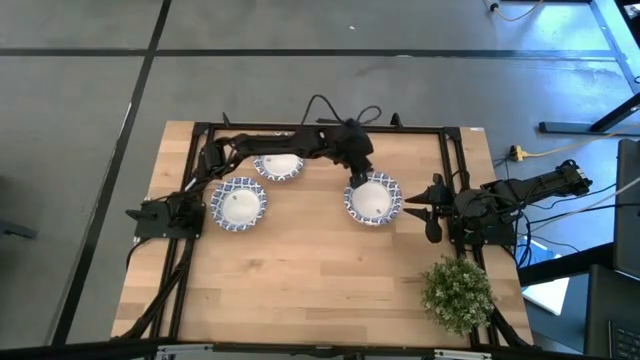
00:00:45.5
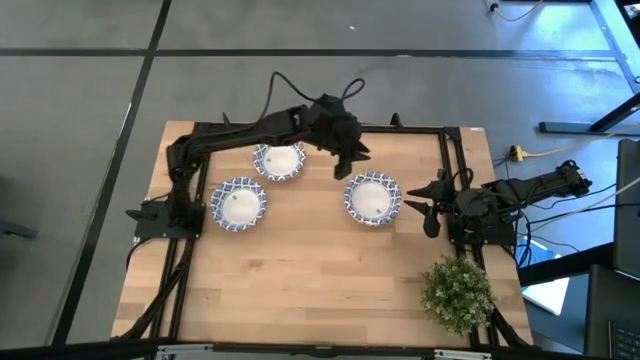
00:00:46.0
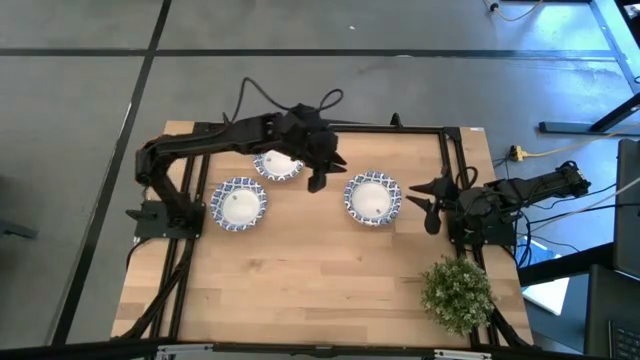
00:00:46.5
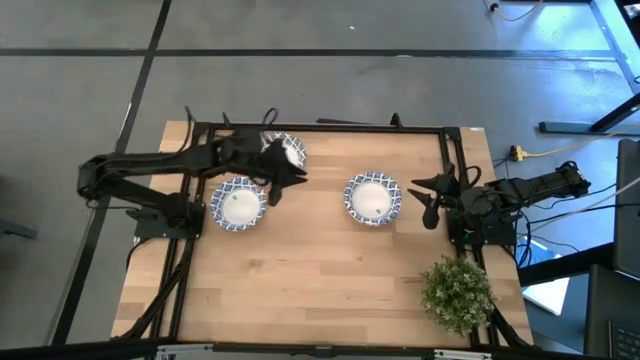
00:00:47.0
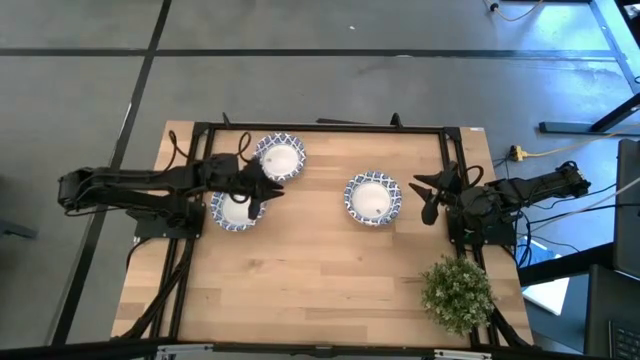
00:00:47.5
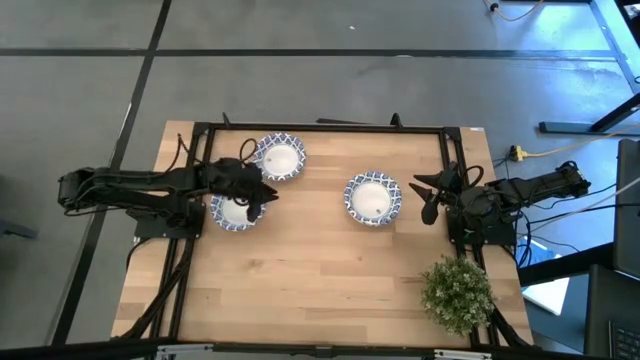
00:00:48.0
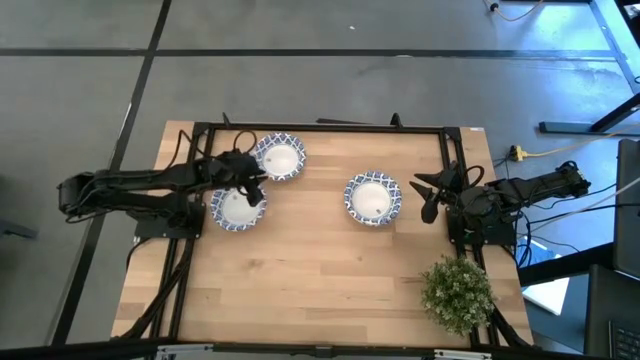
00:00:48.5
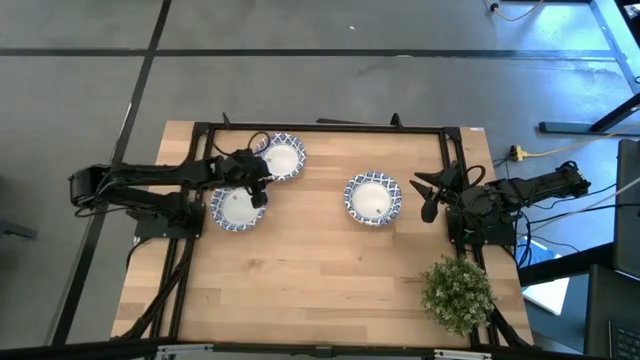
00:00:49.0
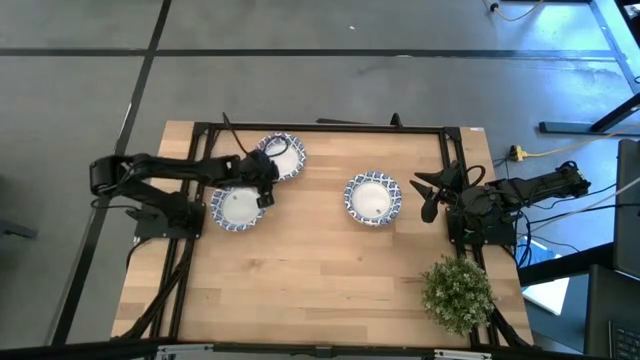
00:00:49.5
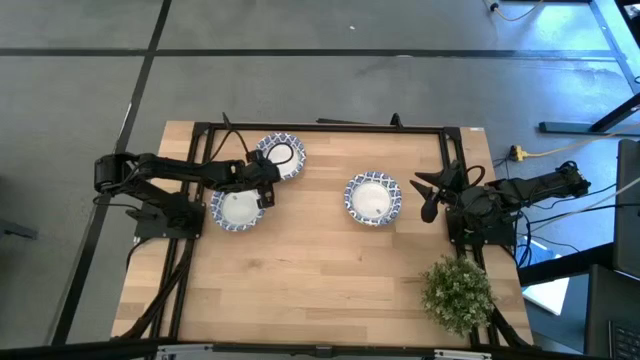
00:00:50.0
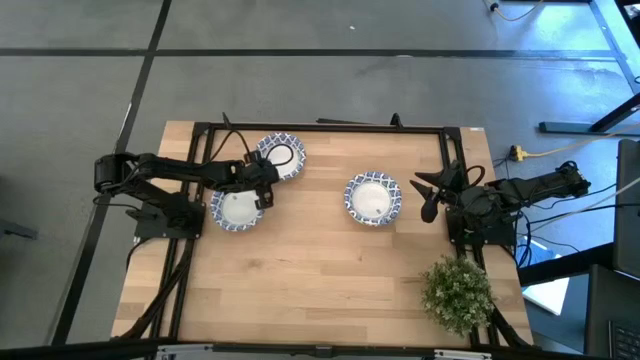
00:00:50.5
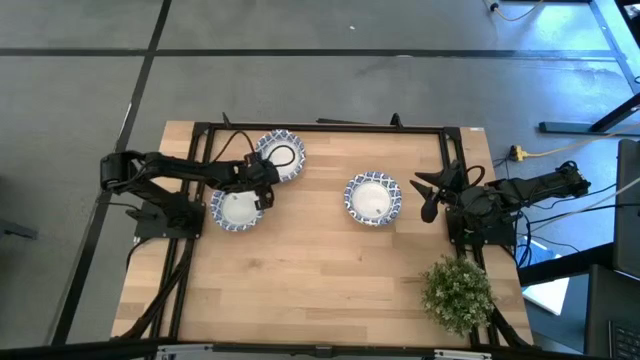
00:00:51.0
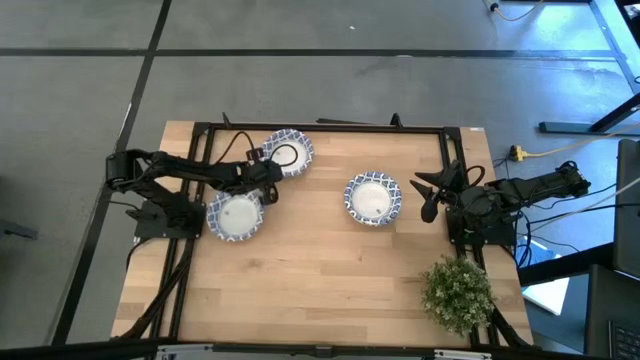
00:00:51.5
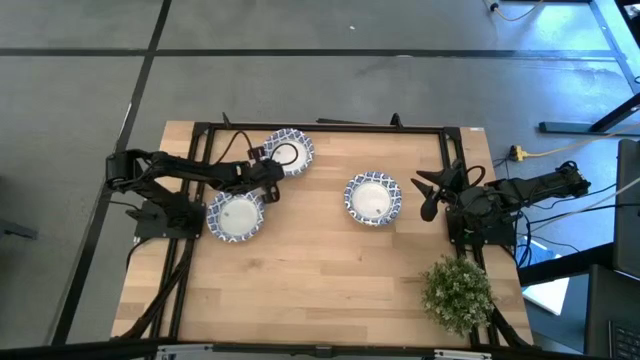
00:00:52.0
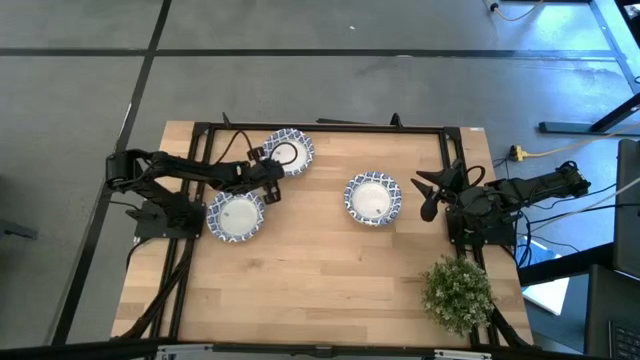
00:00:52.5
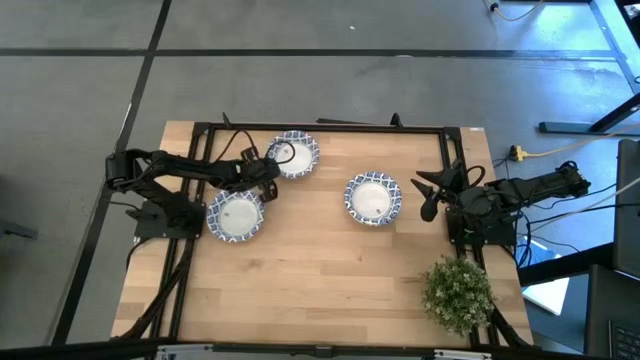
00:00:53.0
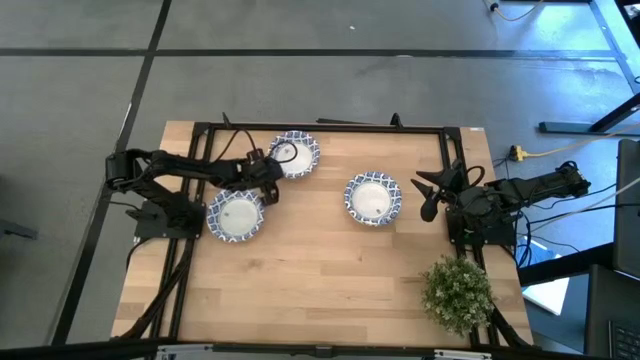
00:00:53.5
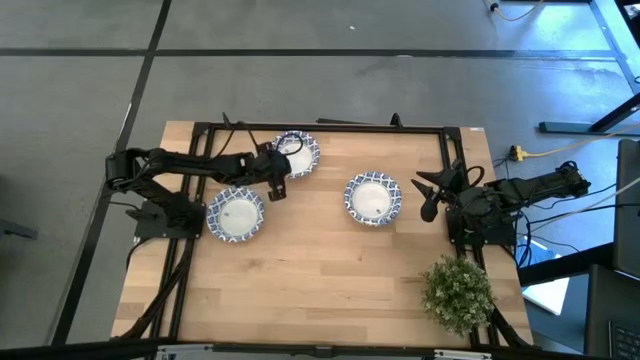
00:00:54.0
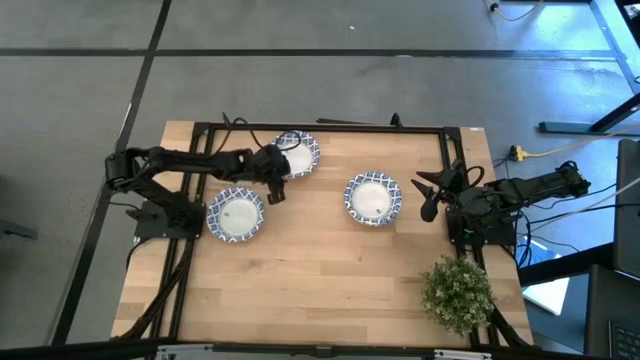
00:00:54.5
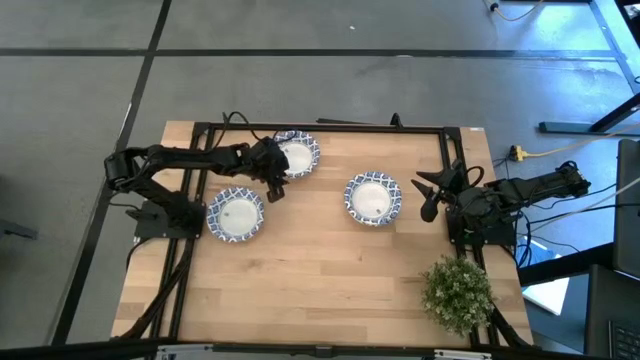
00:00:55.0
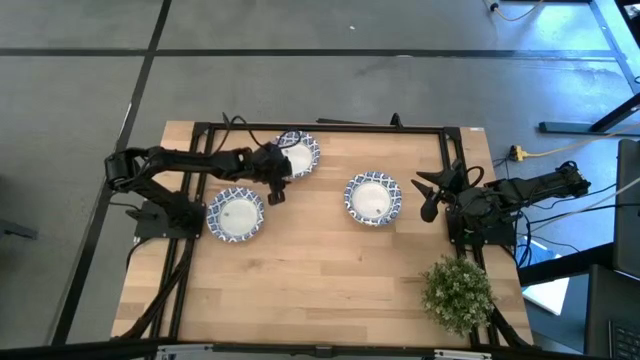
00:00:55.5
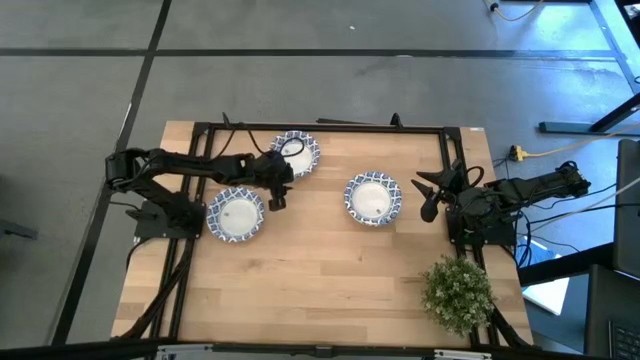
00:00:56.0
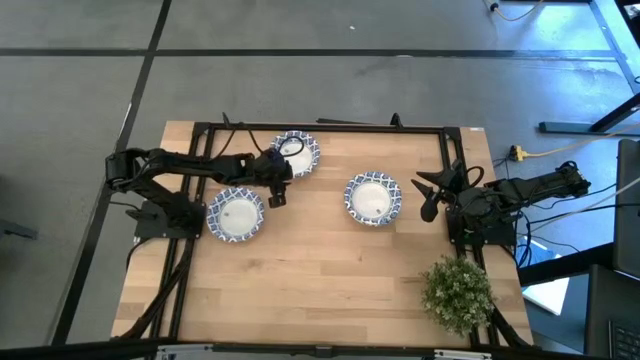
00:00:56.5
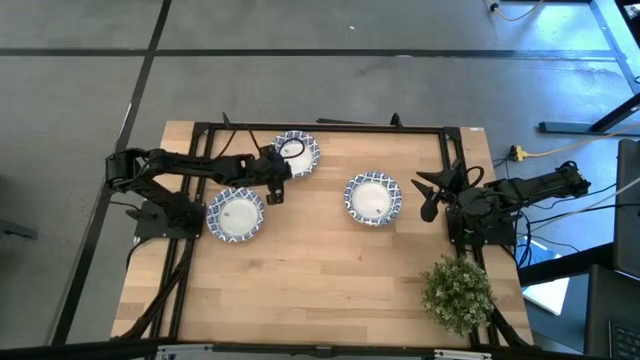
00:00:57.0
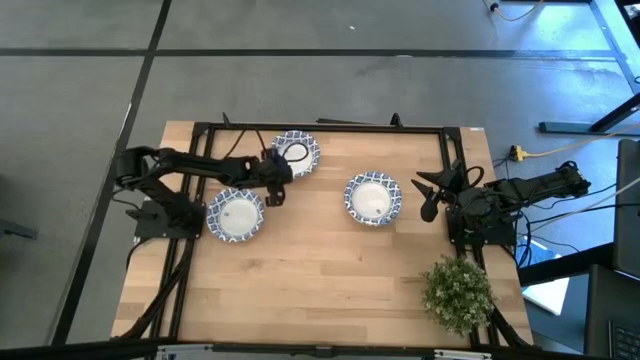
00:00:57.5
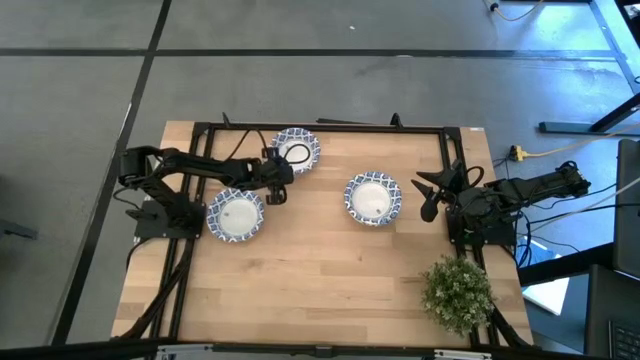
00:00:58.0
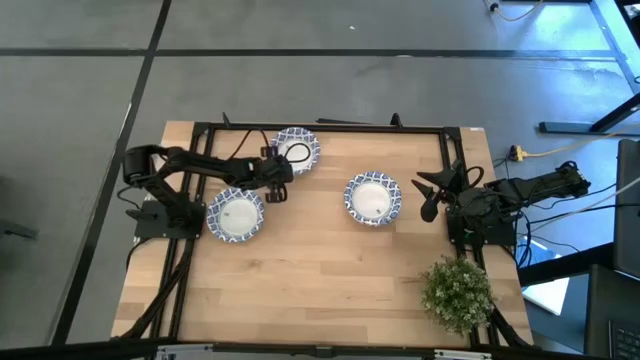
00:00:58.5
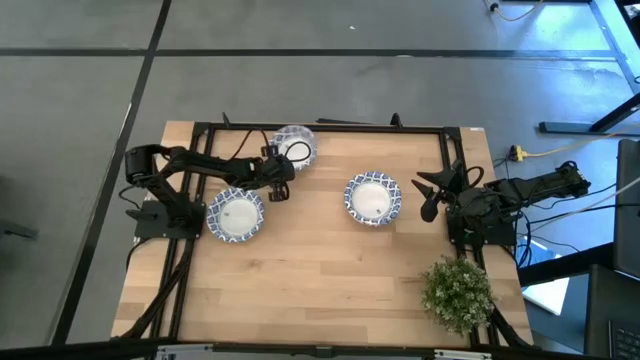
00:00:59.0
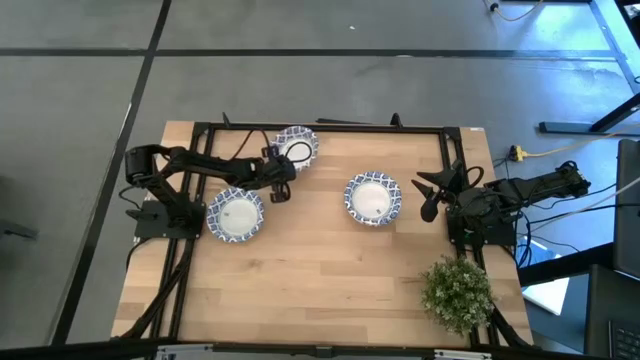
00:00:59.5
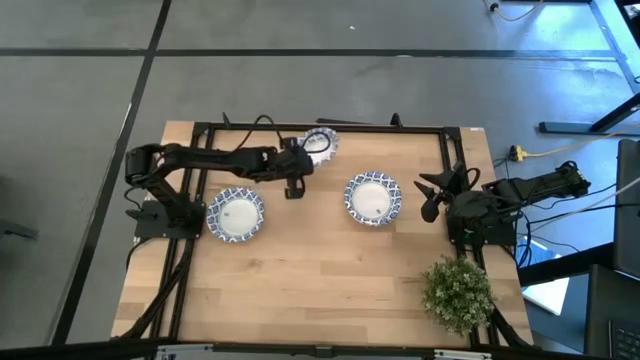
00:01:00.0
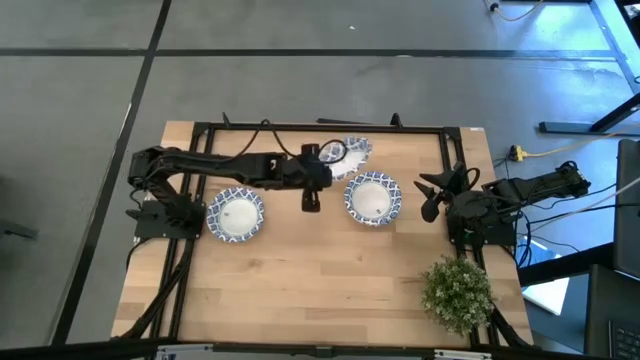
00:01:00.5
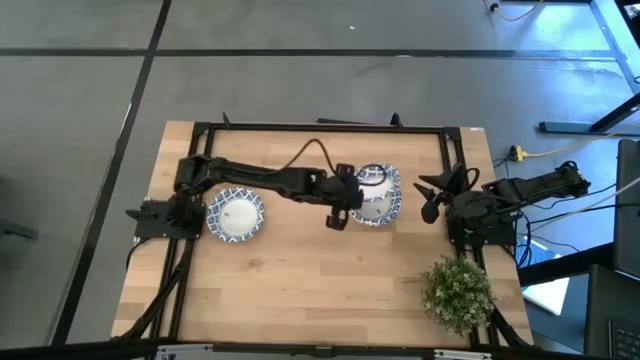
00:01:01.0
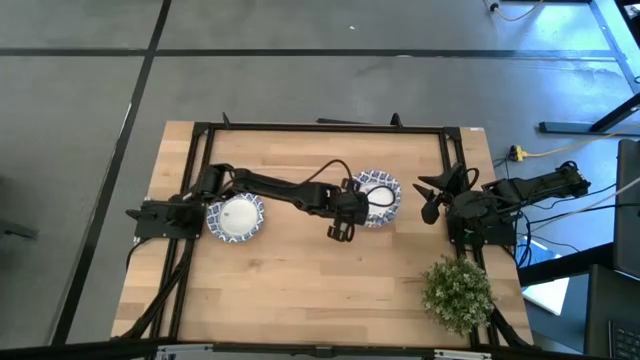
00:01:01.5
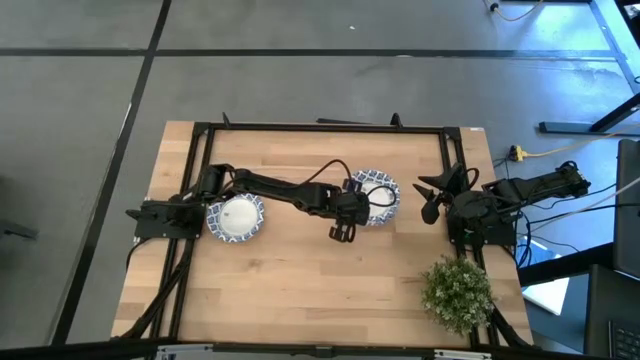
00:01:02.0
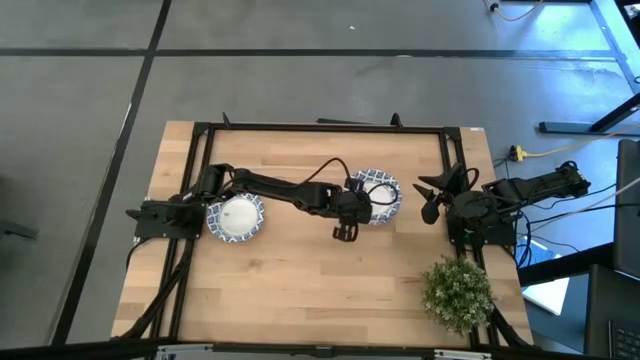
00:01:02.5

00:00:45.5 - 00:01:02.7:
Task: Nest bowls inside each other
Stack the blue bowl on the blue bowls

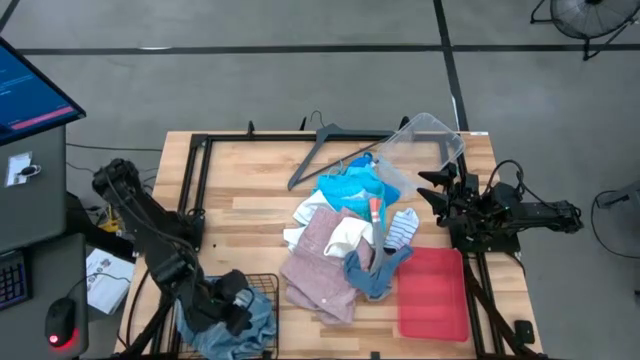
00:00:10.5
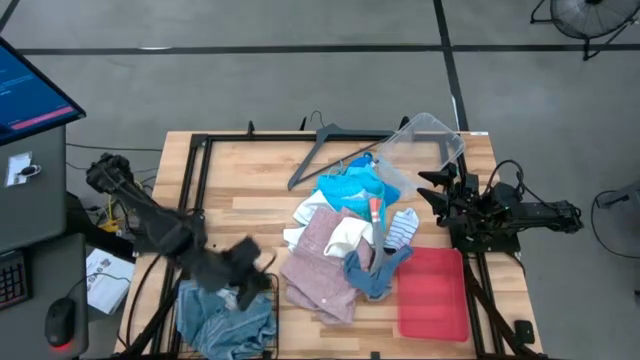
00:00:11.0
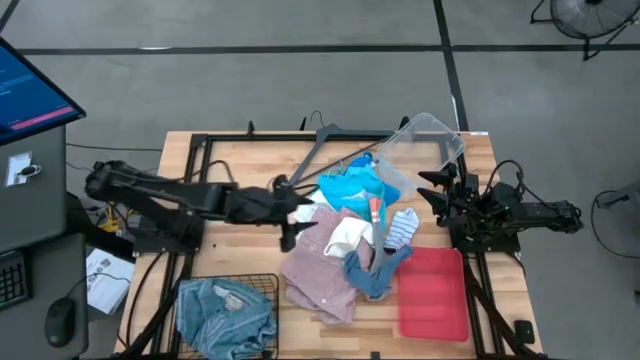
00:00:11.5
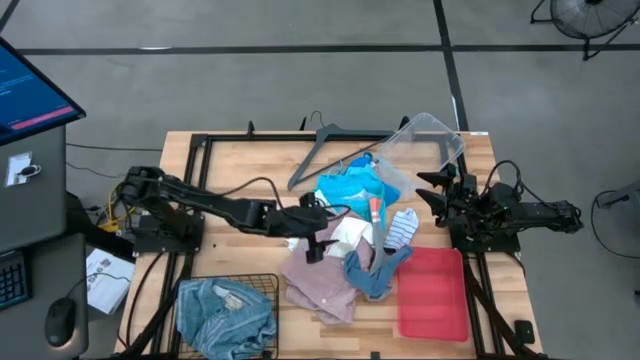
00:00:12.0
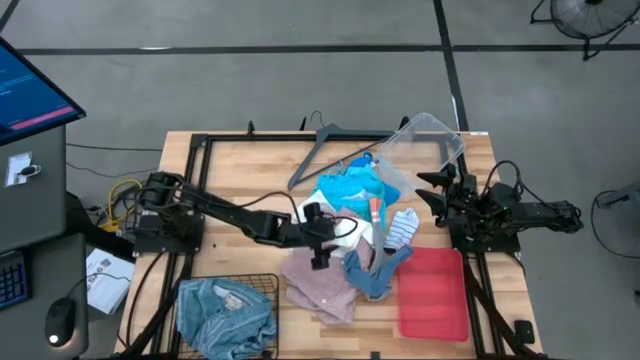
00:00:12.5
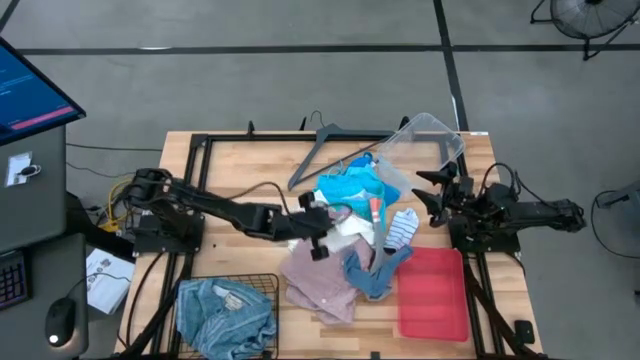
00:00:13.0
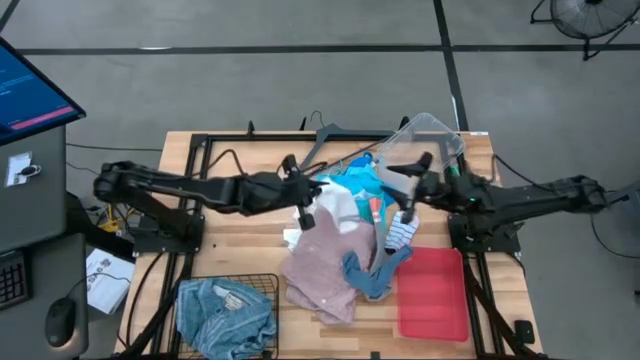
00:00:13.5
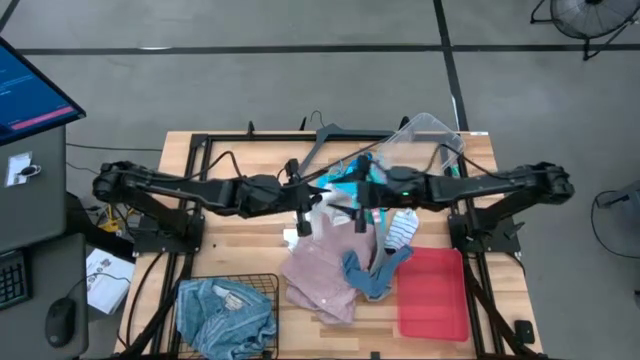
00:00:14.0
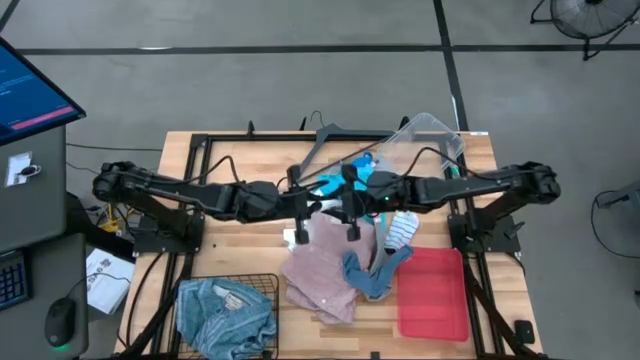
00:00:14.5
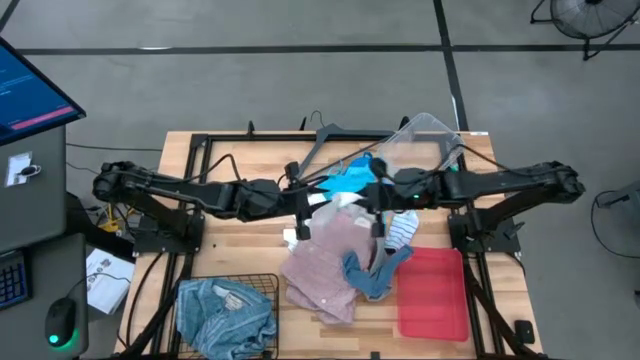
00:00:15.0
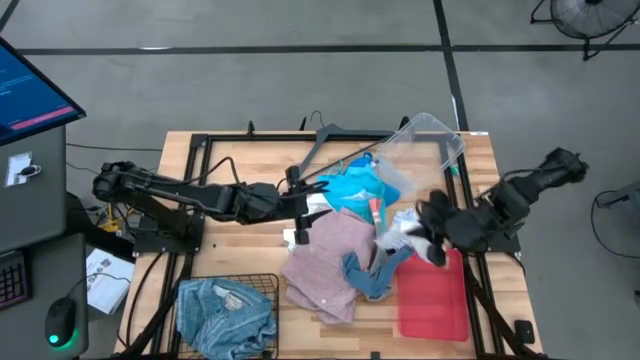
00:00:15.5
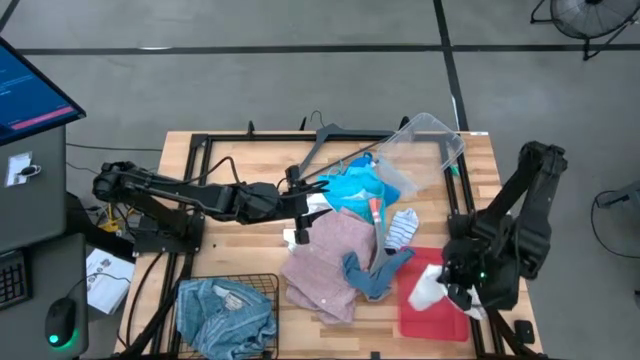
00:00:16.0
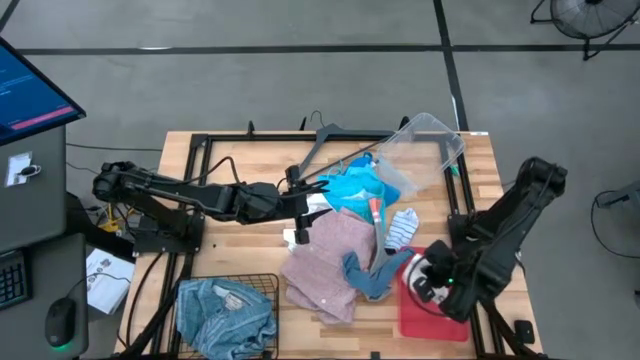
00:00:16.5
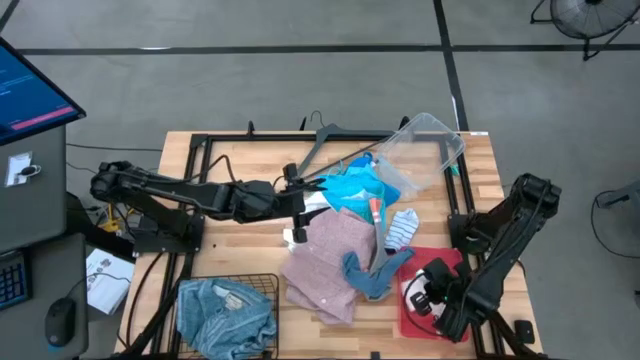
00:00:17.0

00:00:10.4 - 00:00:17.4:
Task: Pick & Place Cloths
Put the white sock into the red bin
